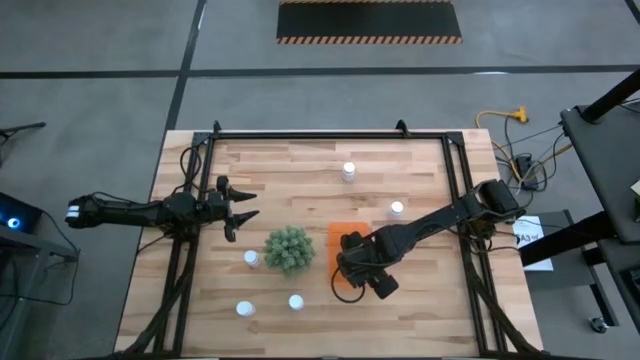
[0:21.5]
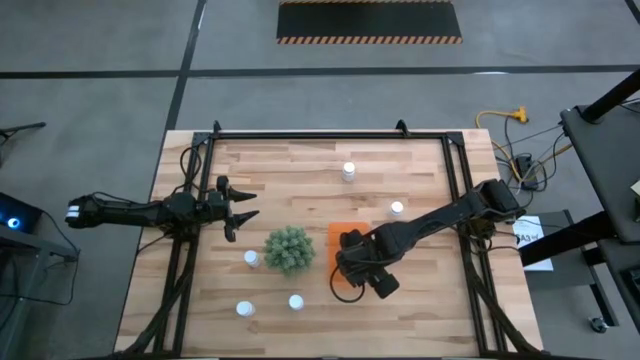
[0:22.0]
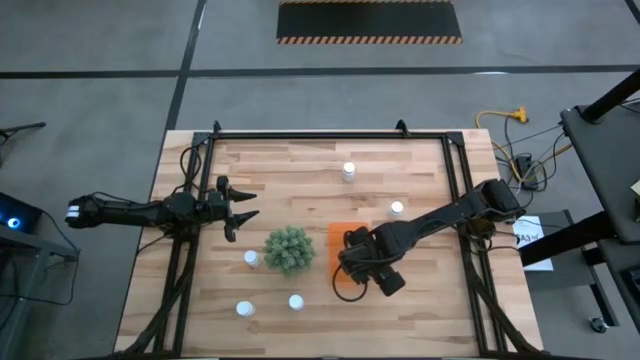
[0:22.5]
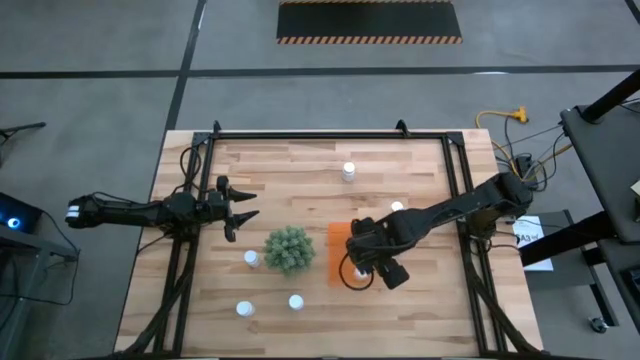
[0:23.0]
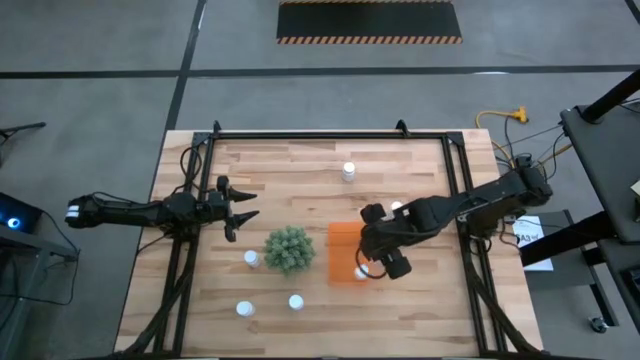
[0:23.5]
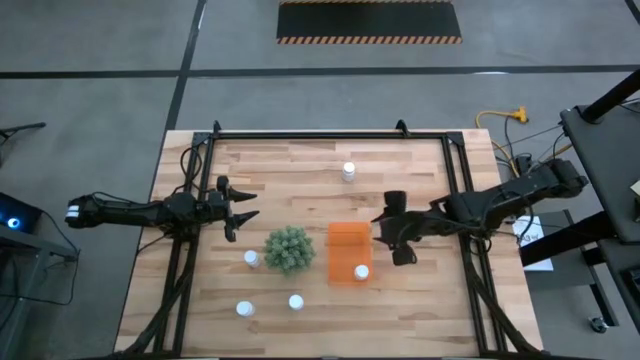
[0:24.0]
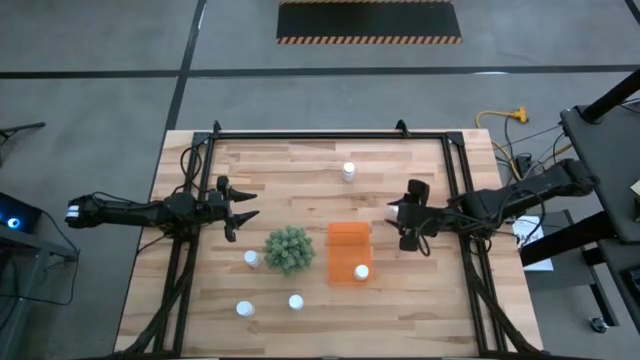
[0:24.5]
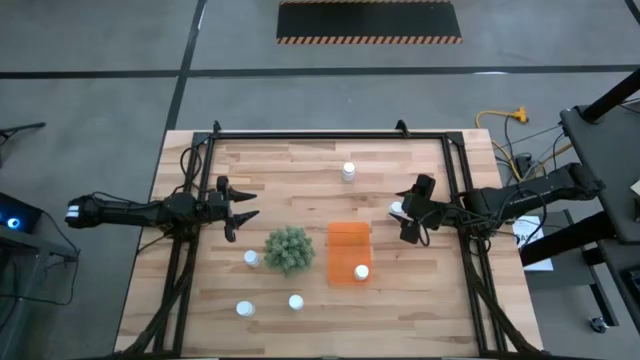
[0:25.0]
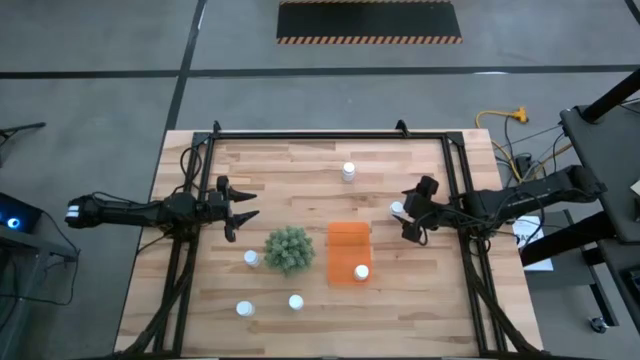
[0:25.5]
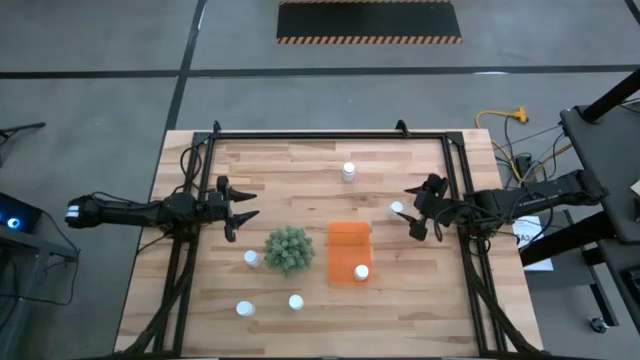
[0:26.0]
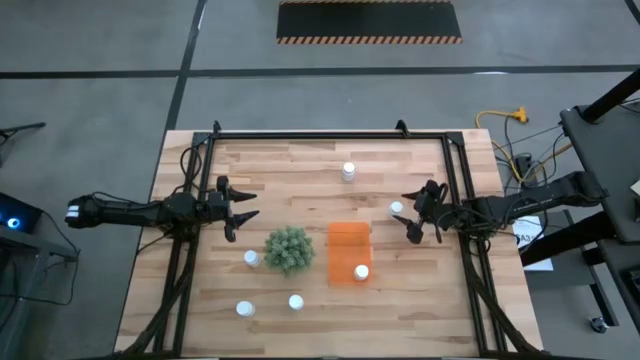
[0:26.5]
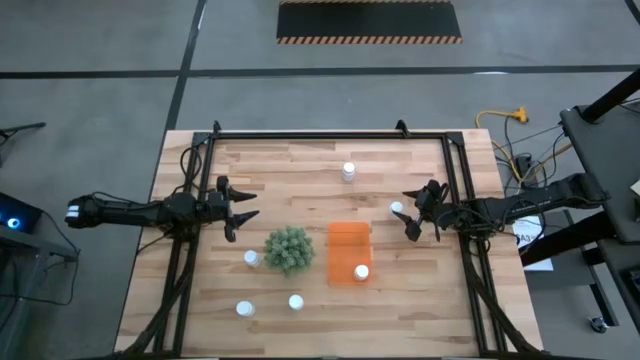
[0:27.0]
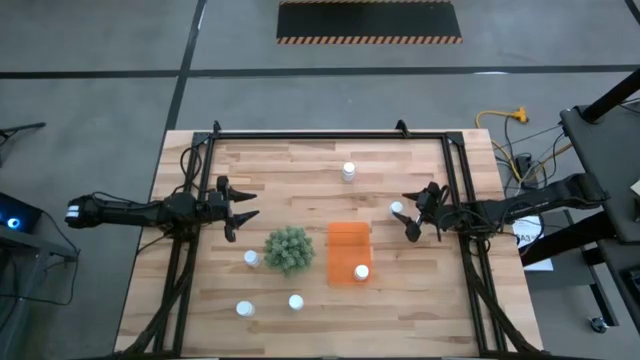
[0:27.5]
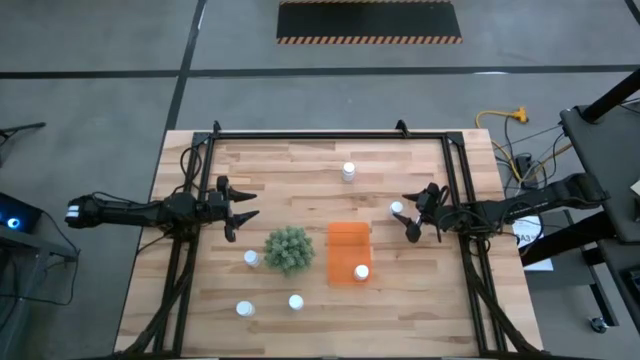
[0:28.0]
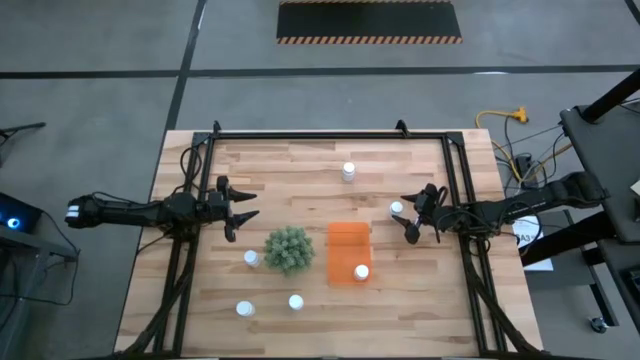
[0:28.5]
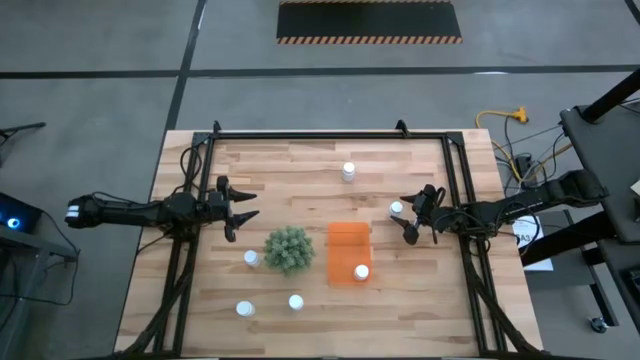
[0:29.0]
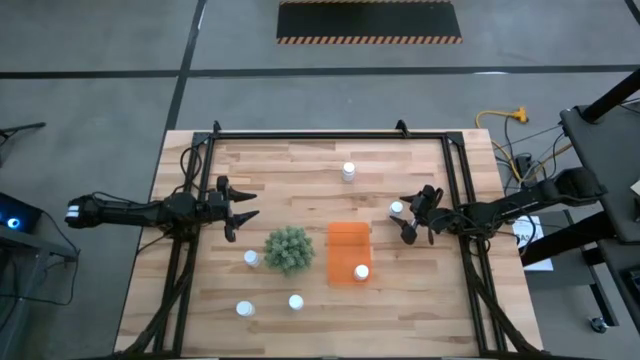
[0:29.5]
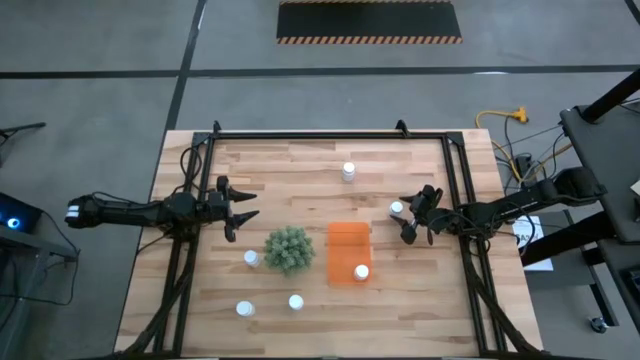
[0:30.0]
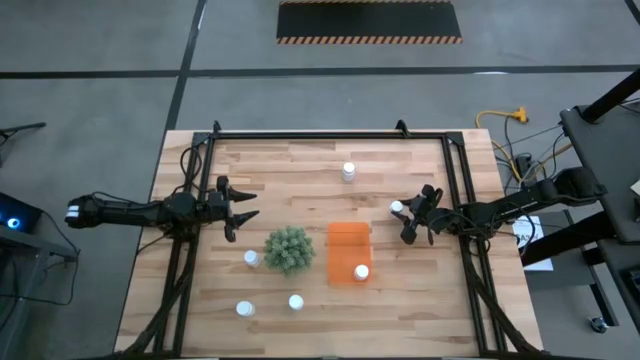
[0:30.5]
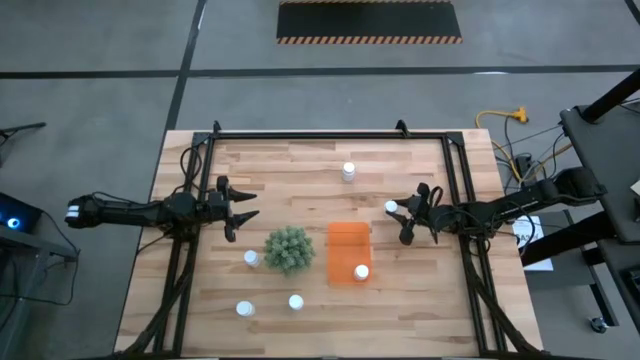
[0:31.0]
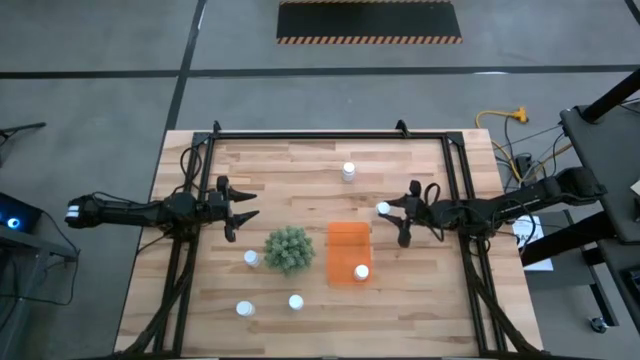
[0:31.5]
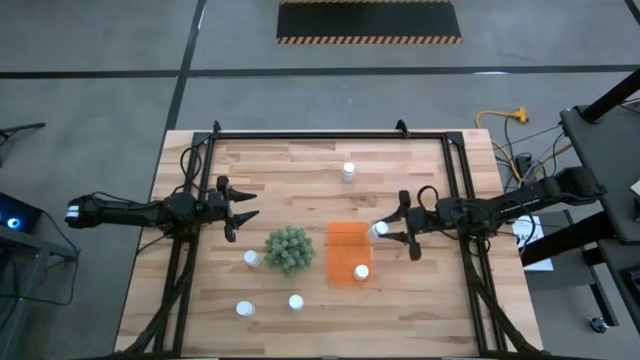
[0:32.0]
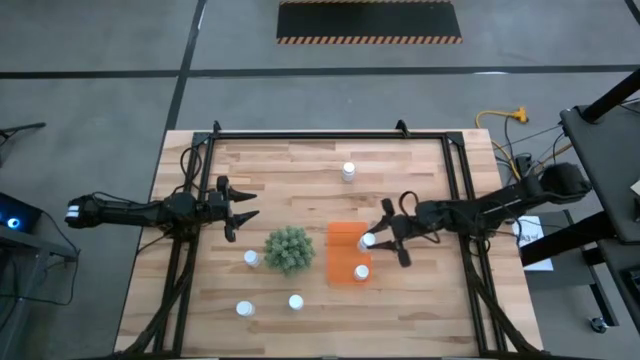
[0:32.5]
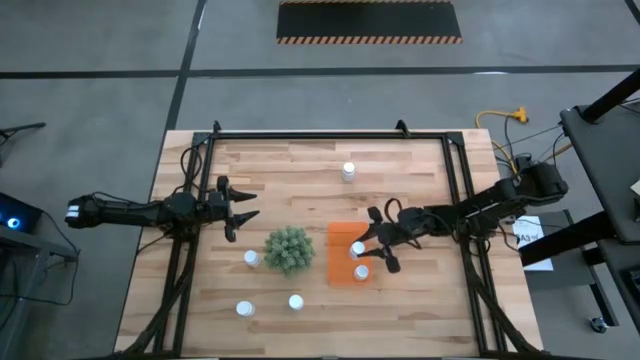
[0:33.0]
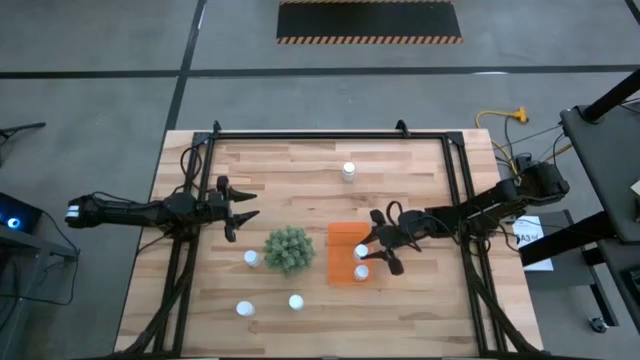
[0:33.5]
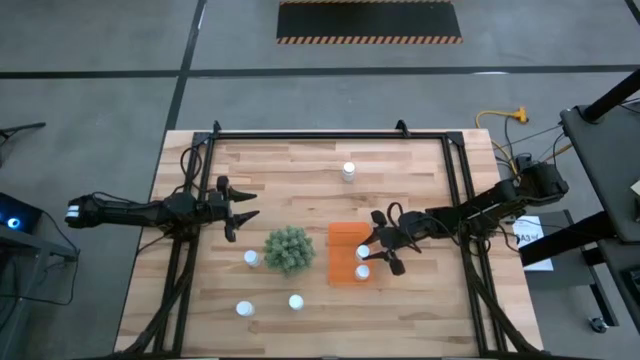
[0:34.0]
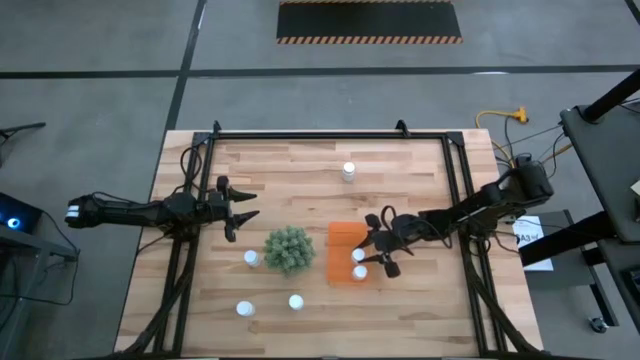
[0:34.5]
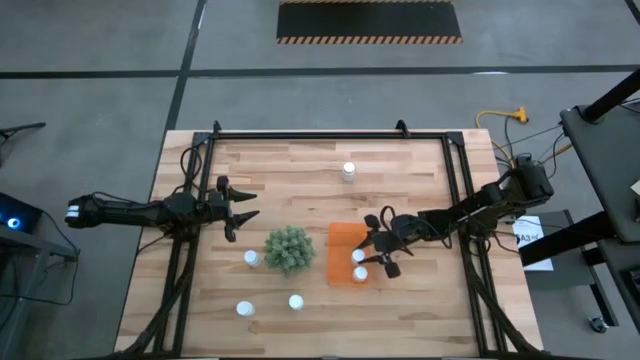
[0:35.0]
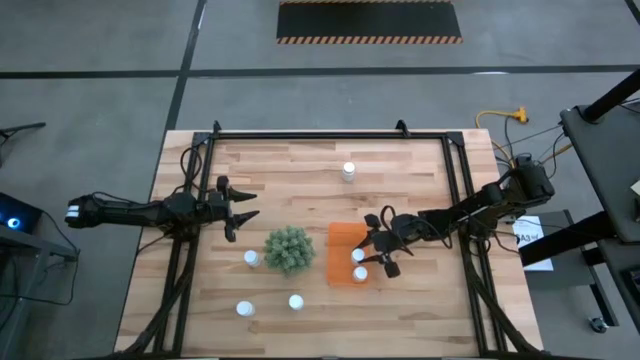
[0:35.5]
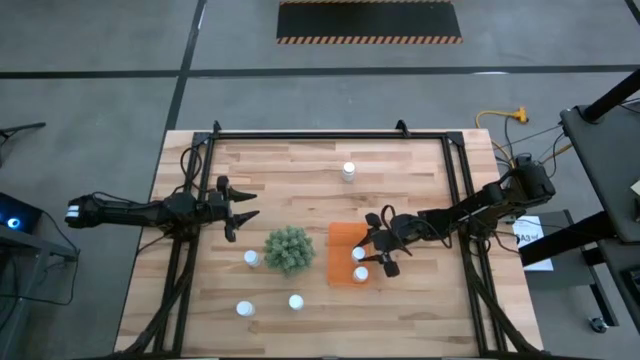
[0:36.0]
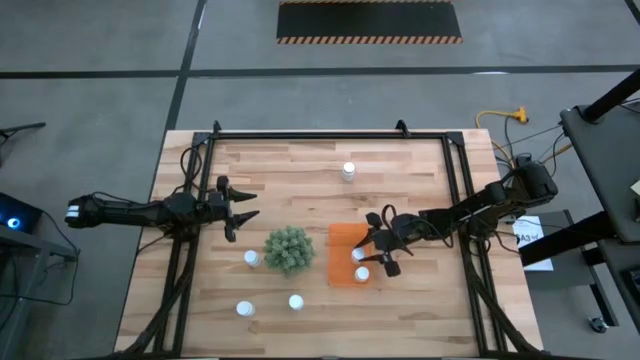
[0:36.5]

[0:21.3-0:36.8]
Task: Pick and place pill bottles into a basket
Put the white medicine bottle into the orange bin

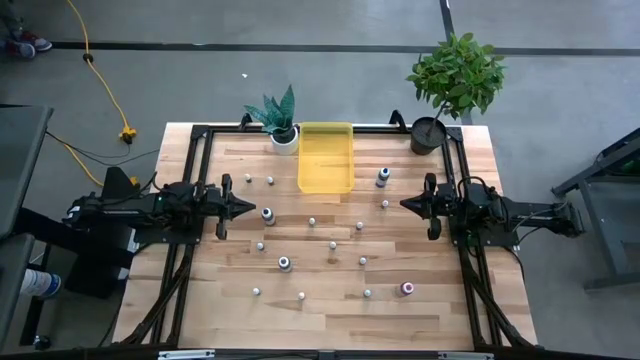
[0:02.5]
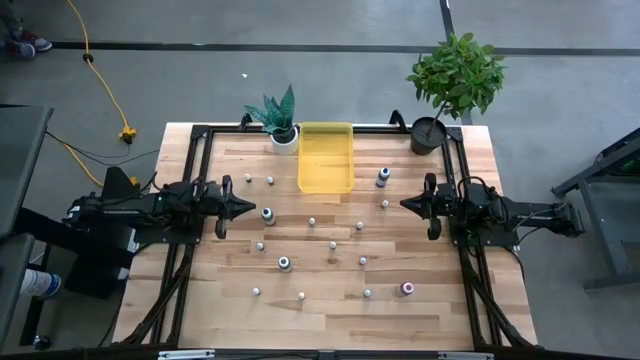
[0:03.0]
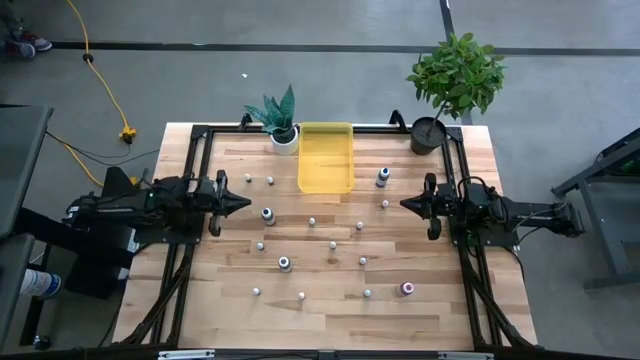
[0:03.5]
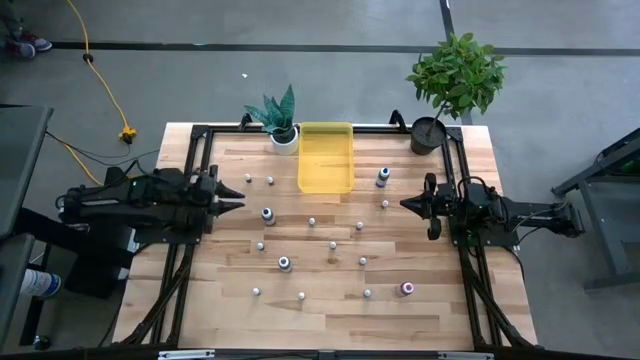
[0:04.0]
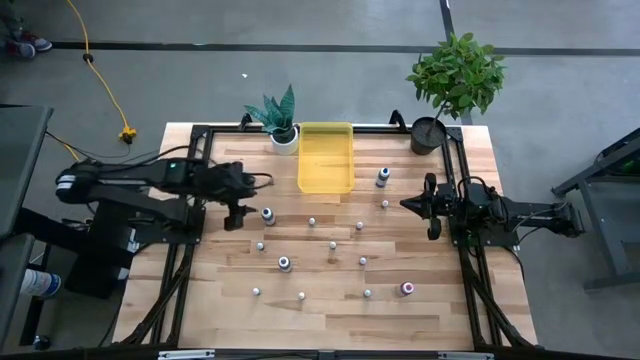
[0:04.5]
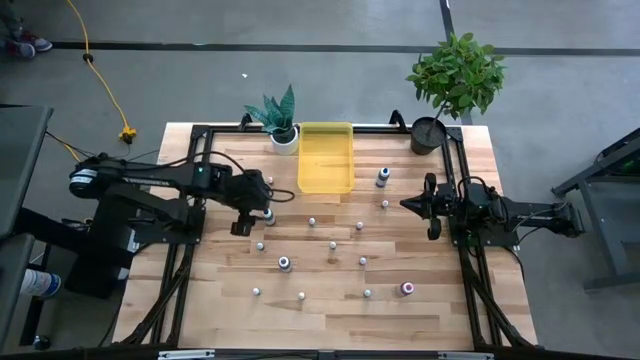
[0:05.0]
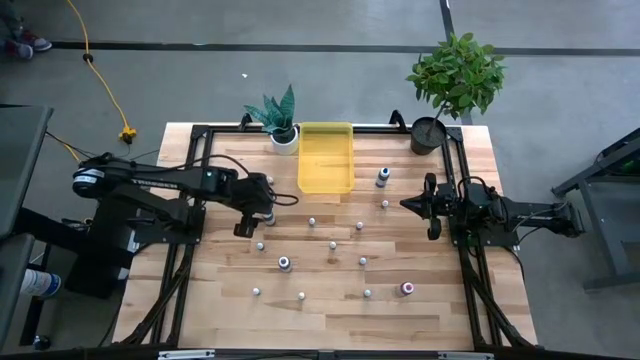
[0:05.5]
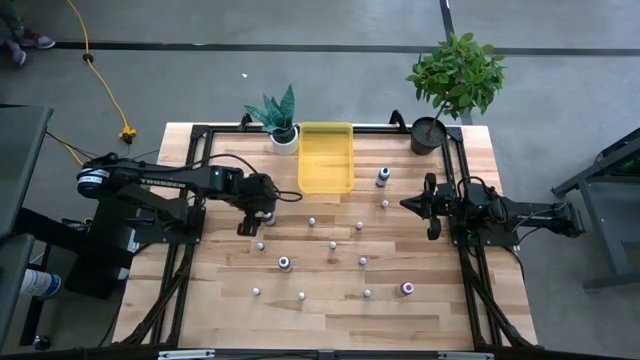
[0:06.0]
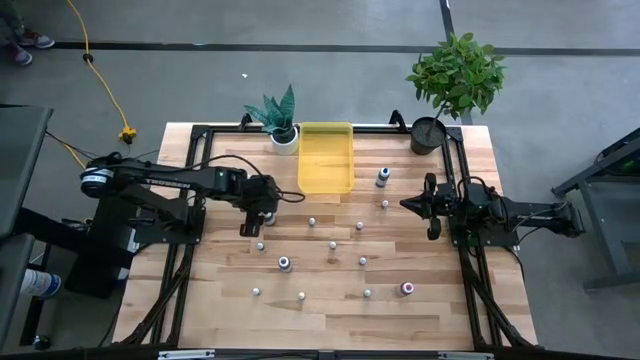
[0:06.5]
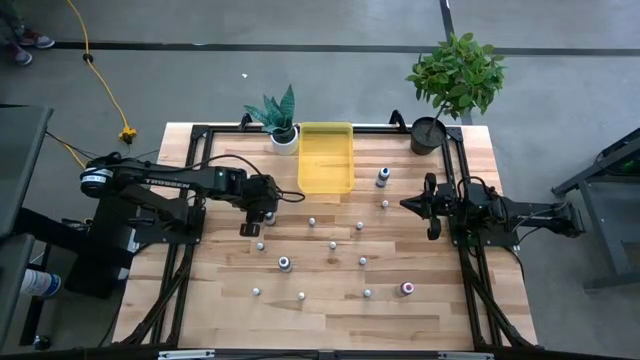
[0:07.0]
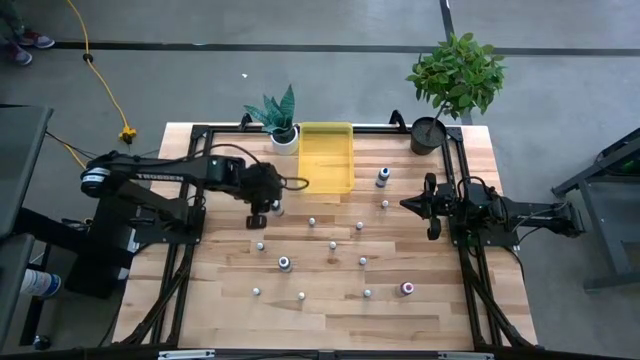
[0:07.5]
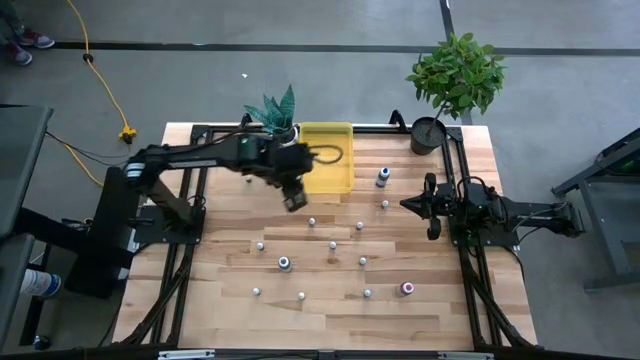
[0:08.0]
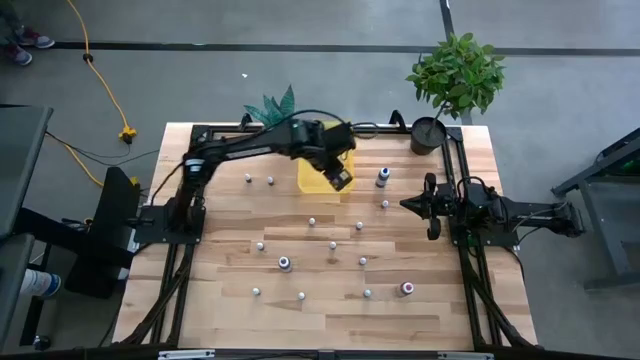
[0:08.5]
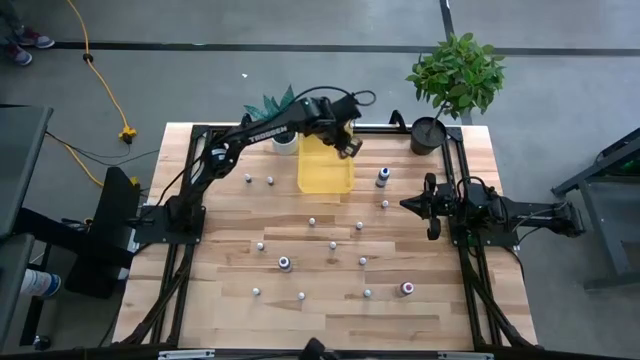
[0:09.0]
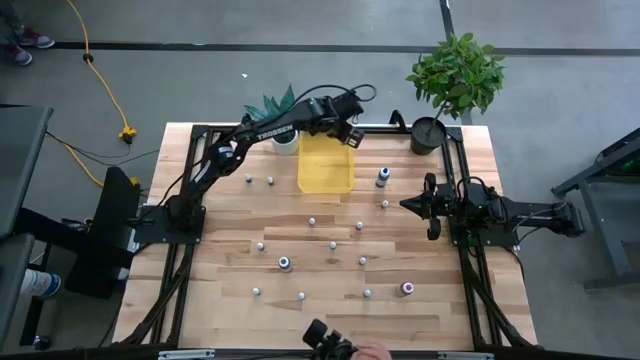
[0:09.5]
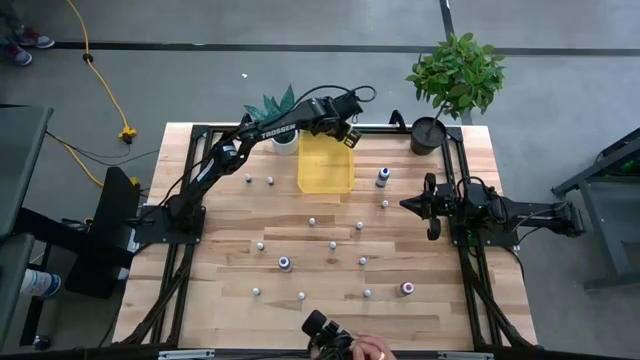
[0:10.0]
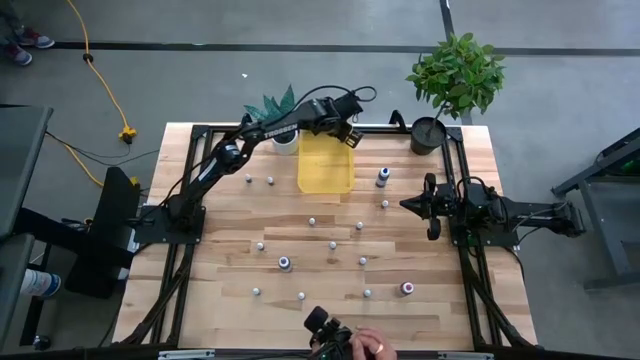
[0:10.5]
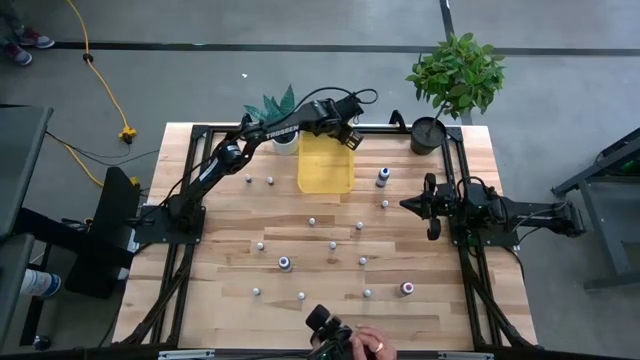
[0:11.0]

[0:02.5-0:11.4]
Task: Pick & Place food coloring
Put the large black food coloring bottle into the yellow bin
